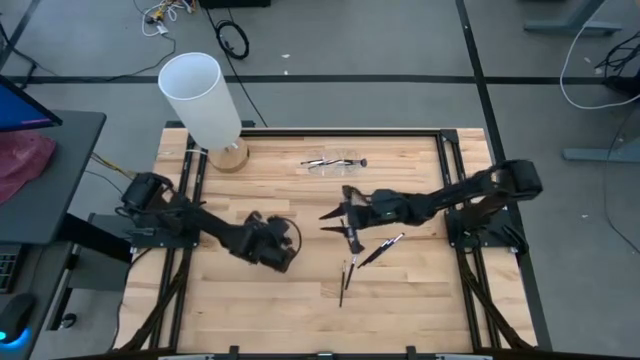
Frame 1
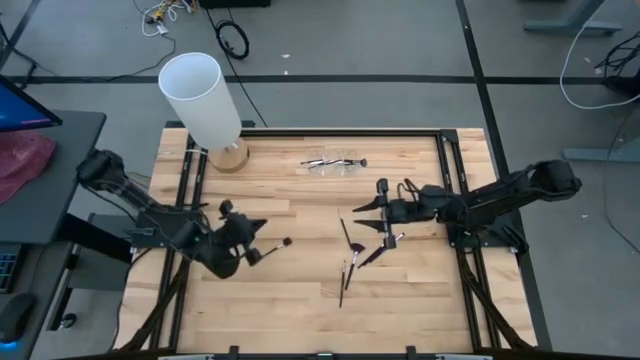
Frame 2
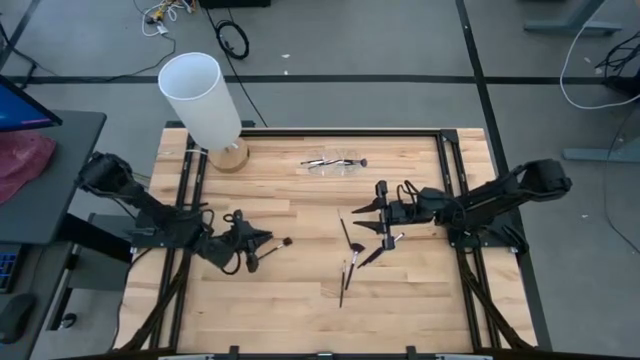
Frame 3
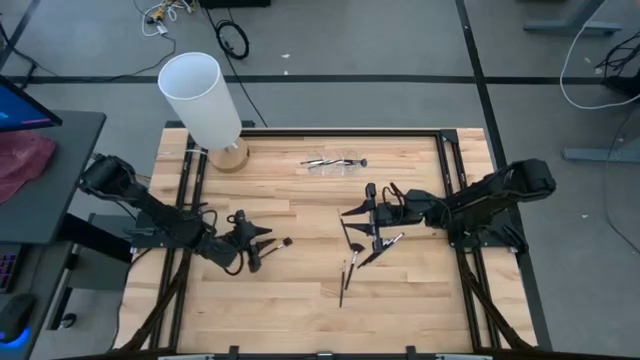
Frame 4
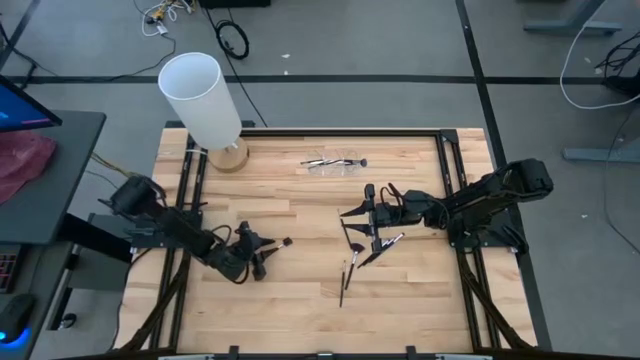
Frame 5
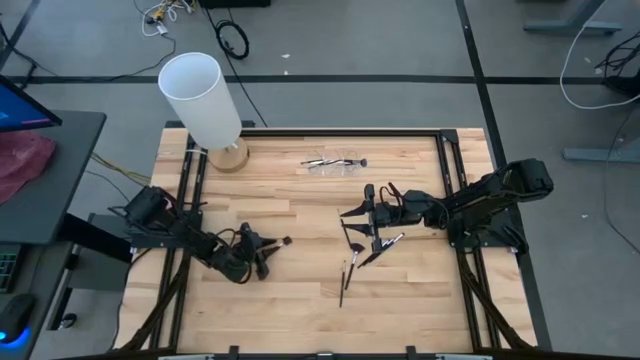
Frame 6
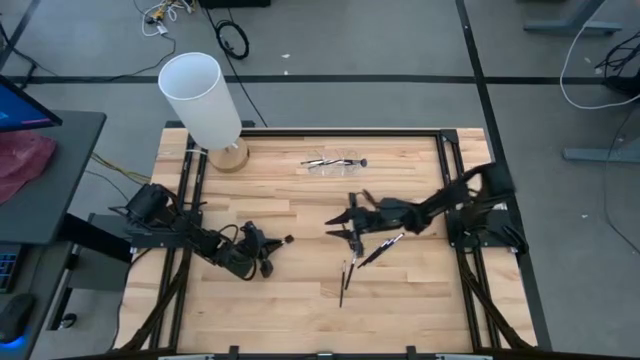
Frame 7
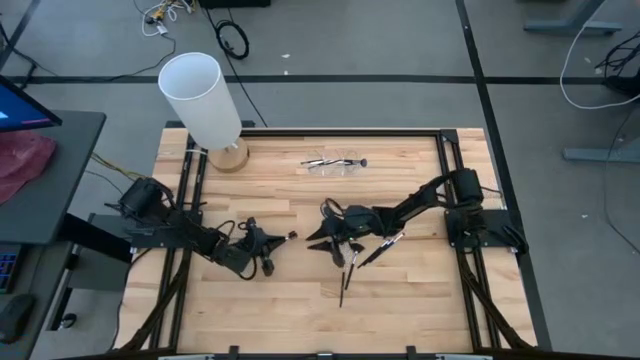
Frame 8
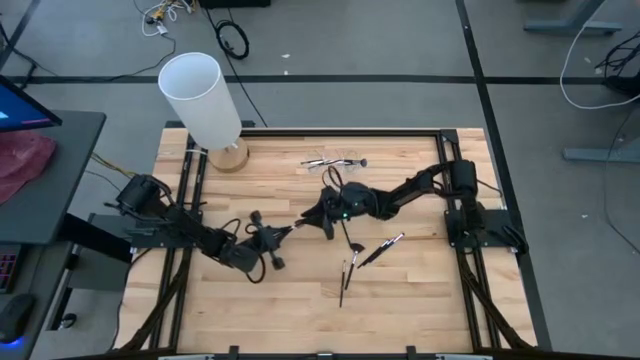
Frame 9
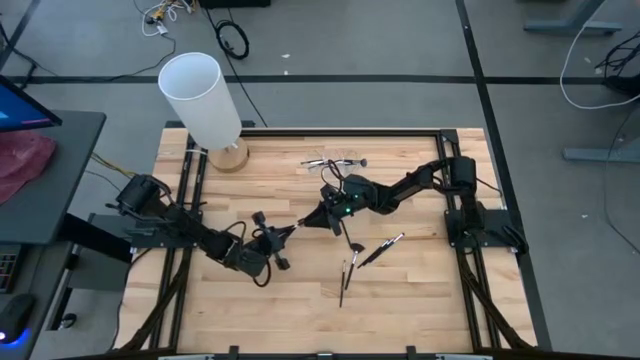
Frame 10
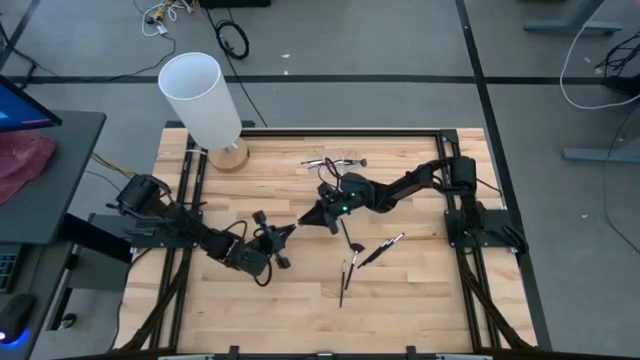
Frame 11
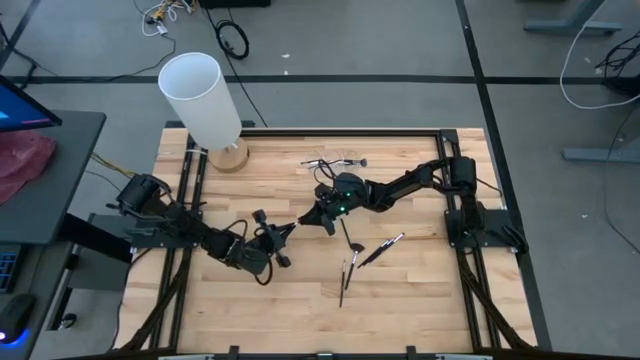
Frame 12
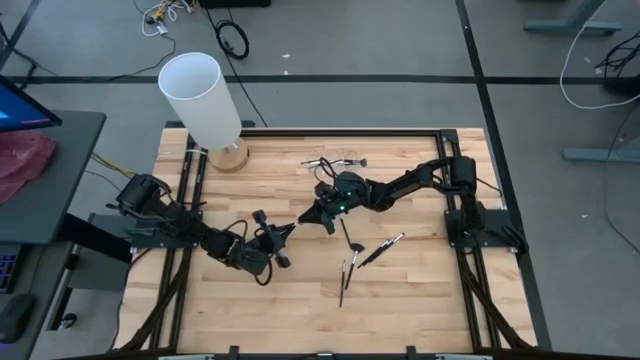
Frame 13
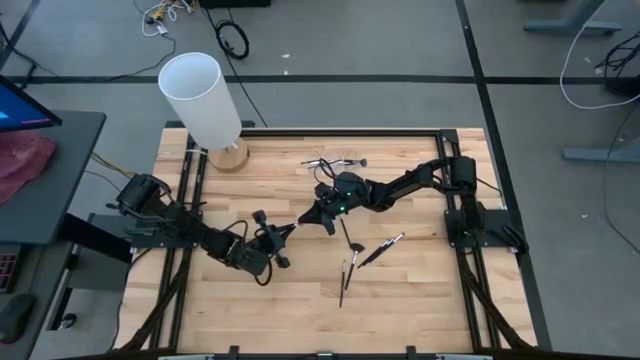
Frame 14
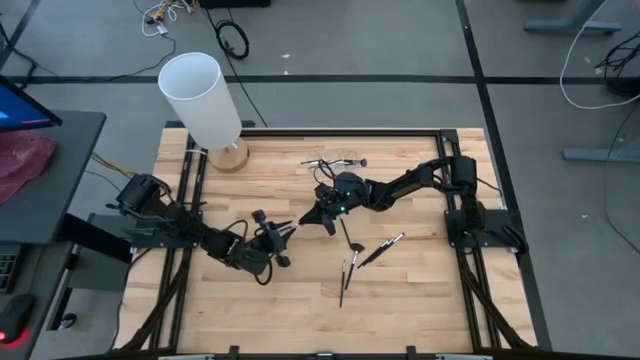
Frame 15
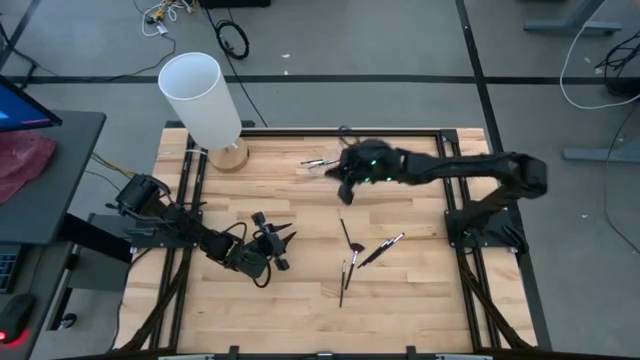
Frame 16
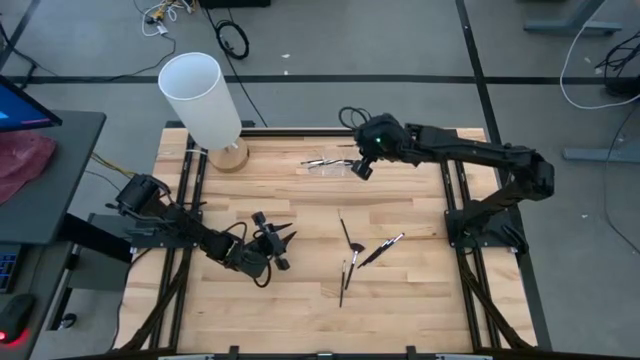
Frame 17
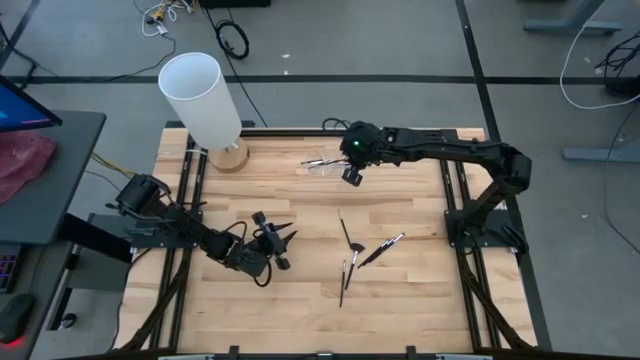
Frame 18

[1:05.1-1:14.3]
Task: Pick & Place Makeup Supplies
Put the makeup brush into the transparent organizer

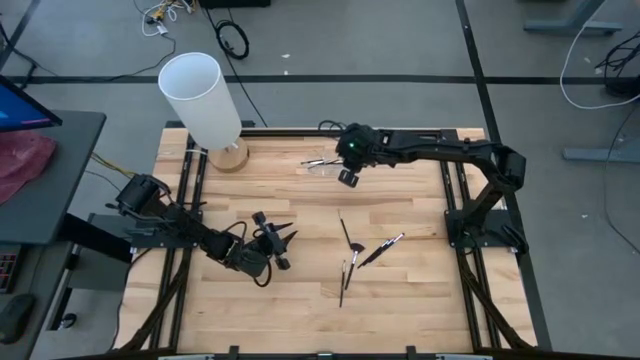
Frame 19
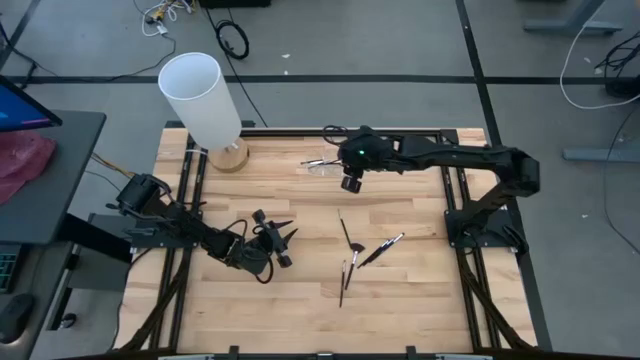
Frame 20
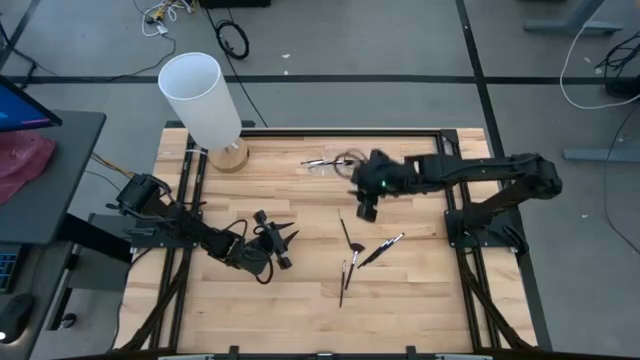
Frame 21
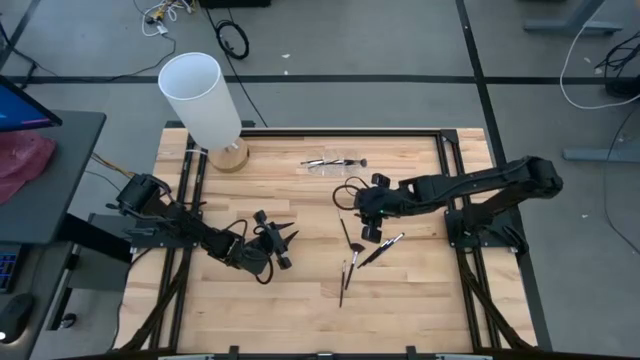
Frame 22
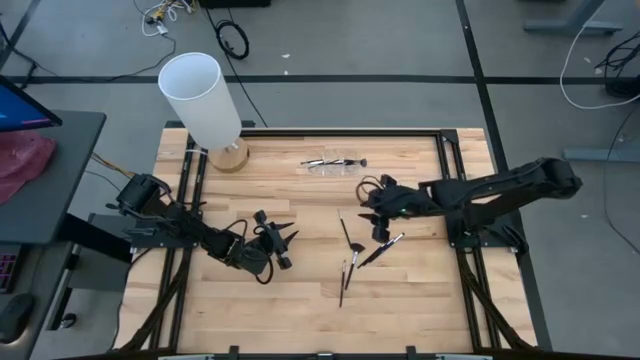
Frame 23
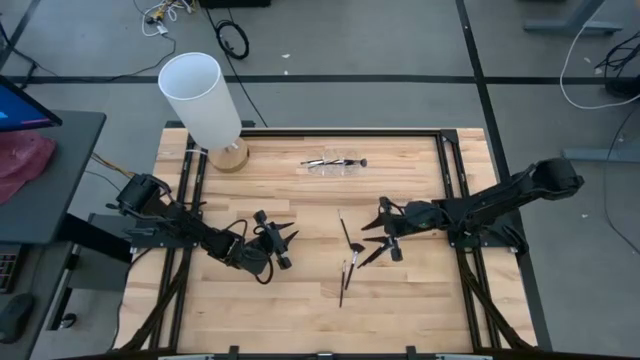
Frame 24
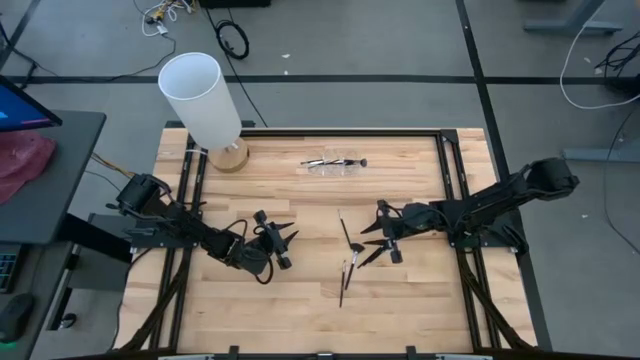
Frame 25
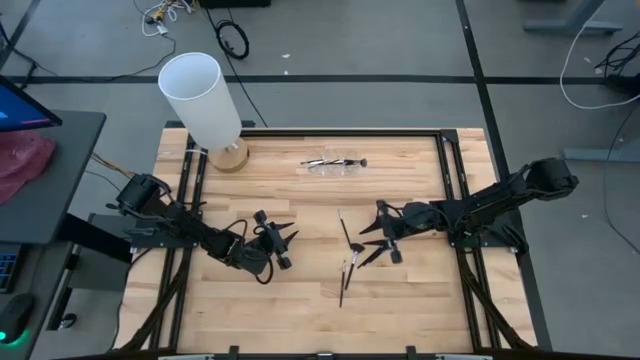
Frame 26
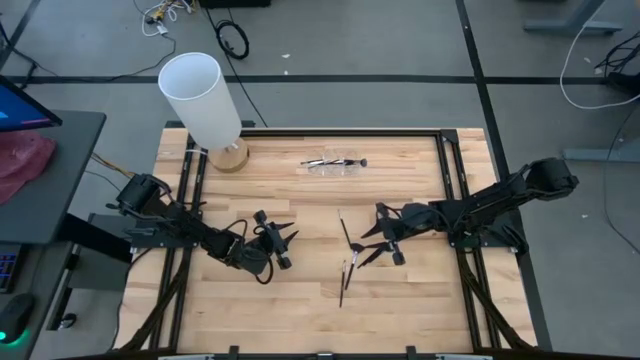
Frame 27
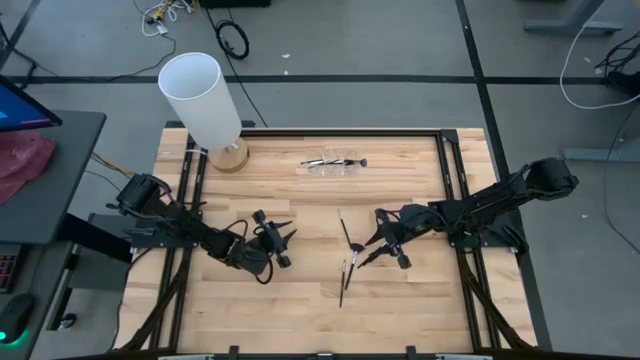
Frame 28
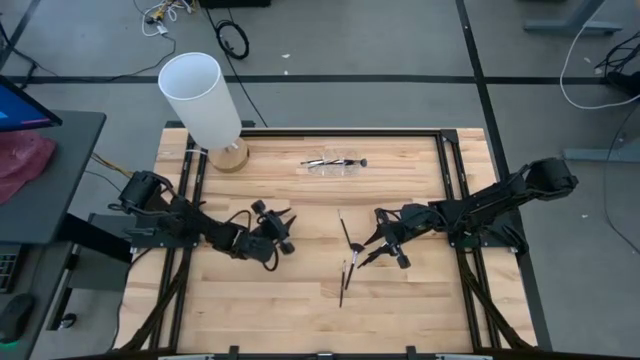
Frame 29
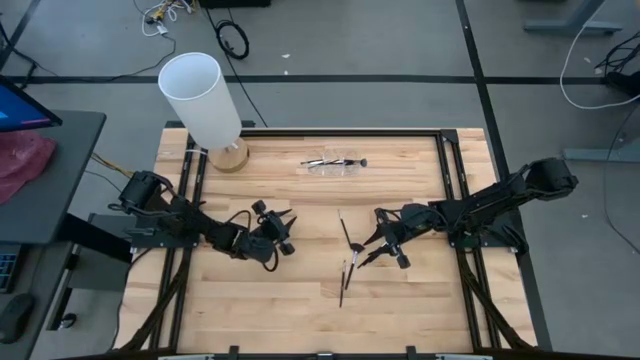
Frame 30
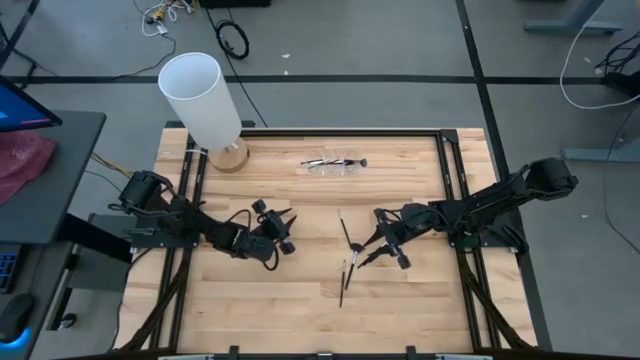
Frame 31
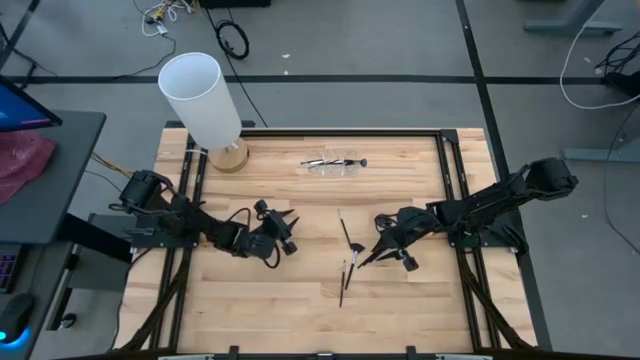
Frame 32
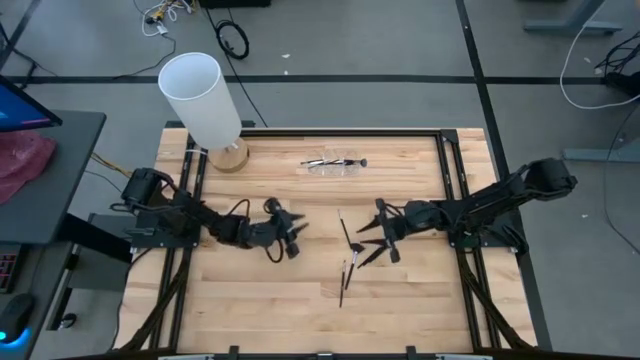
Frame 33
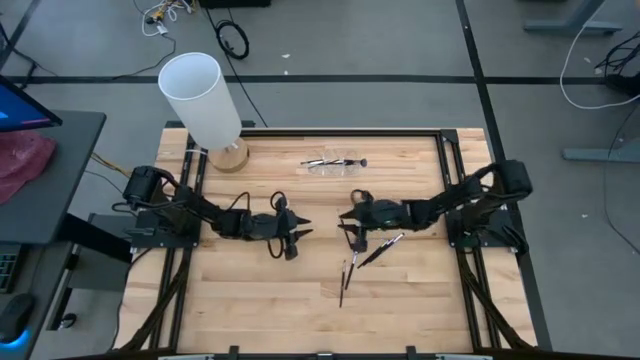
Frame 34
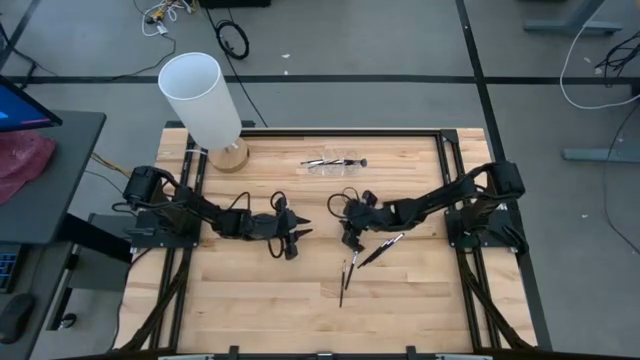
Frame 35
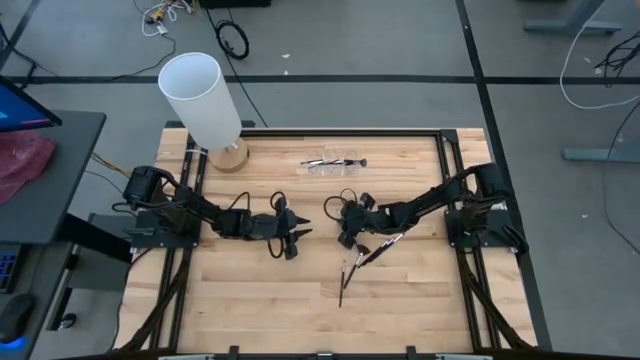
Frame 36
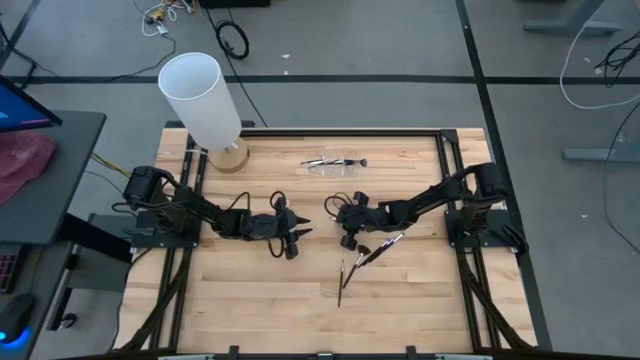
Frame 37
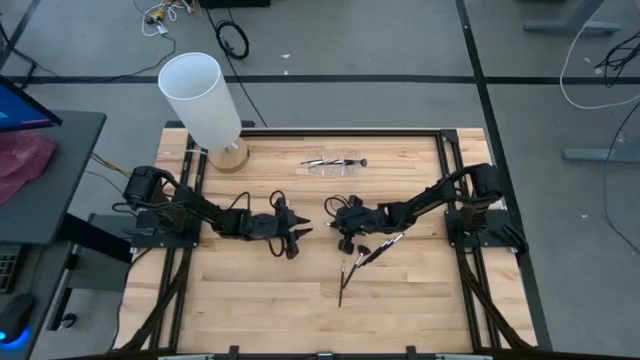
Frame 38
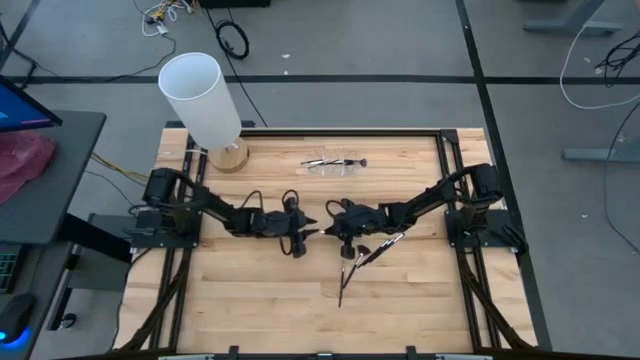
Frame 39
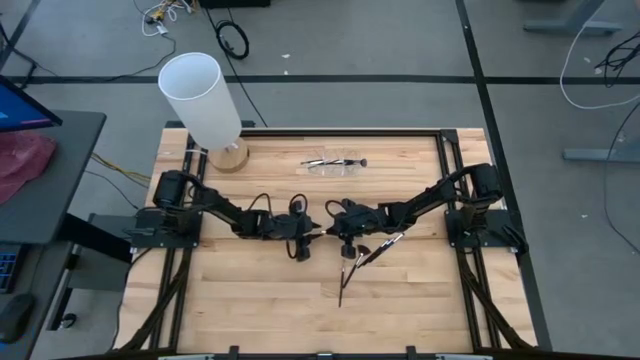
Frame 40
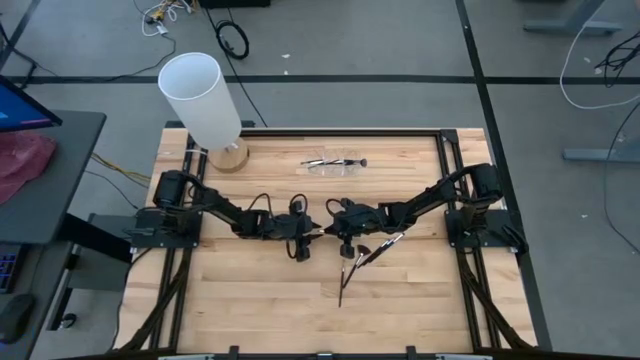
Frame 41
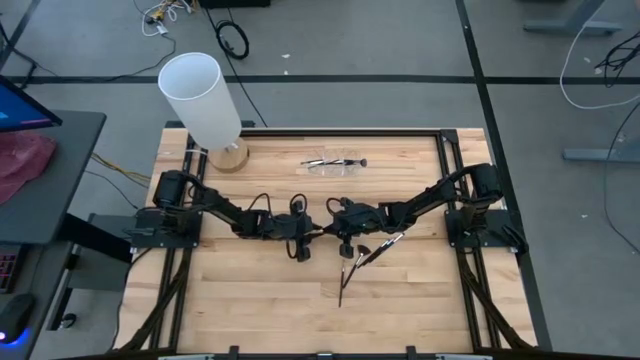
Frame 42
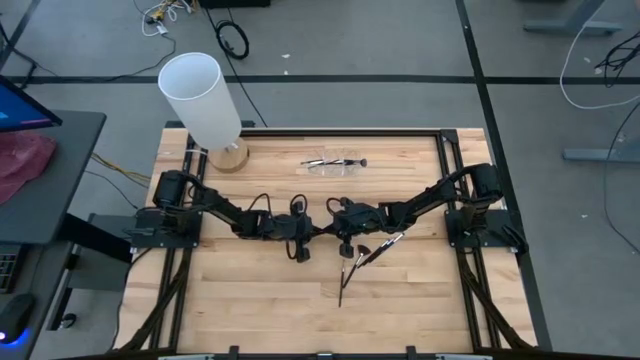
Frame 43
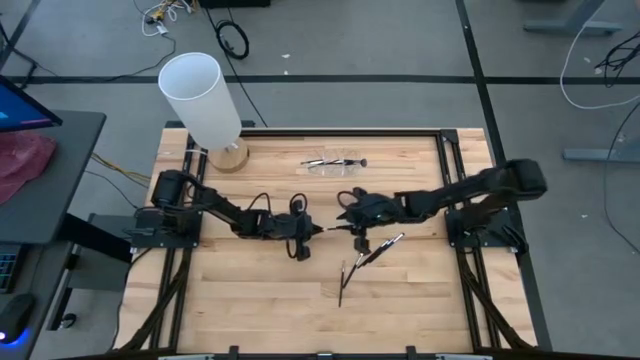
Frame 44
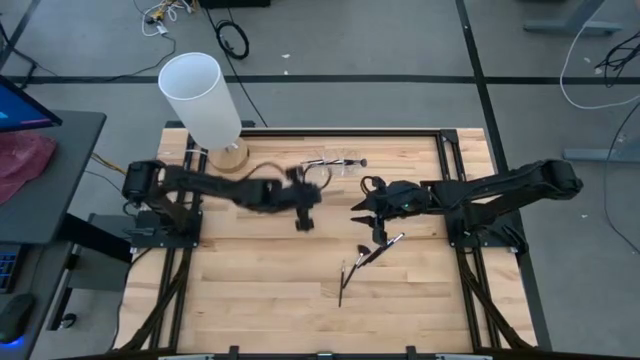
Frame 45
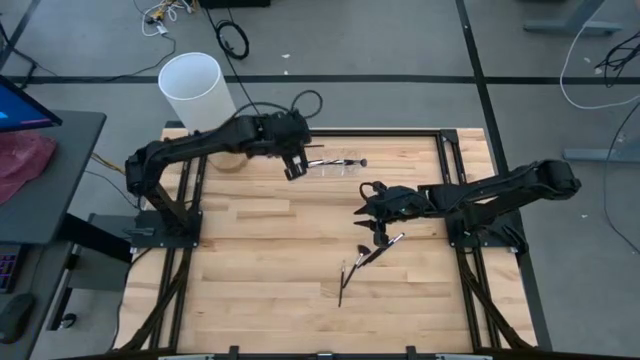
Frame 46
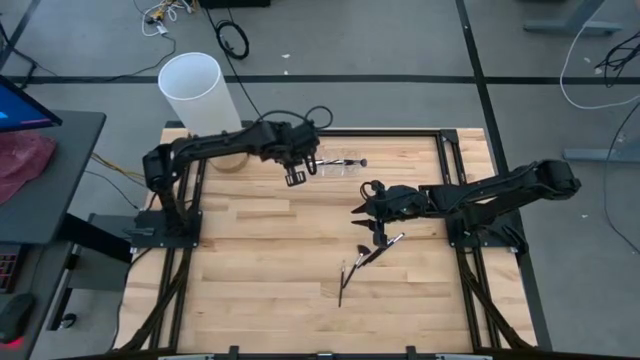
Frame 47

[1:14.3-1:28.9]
Put the makeup brush into the transparent organizer
